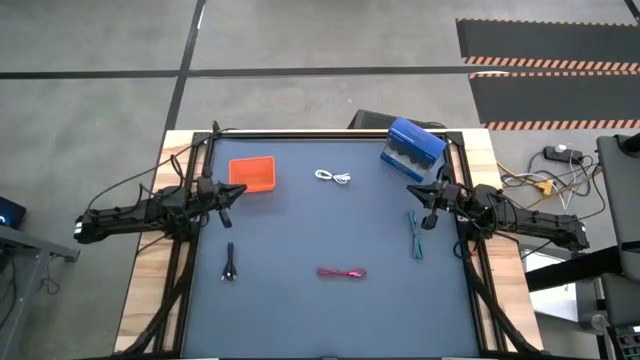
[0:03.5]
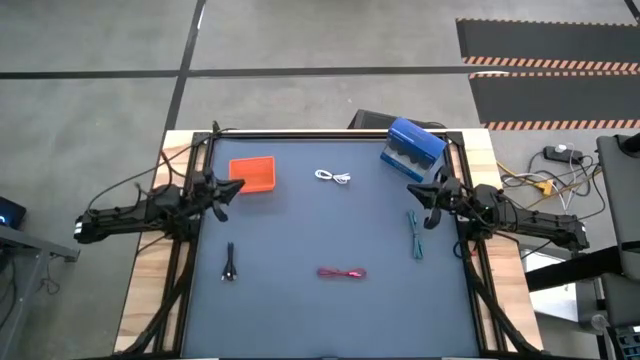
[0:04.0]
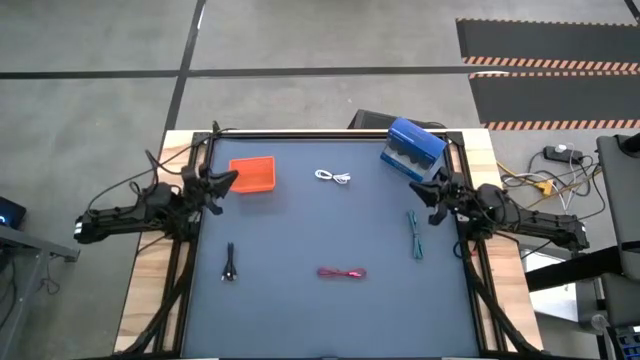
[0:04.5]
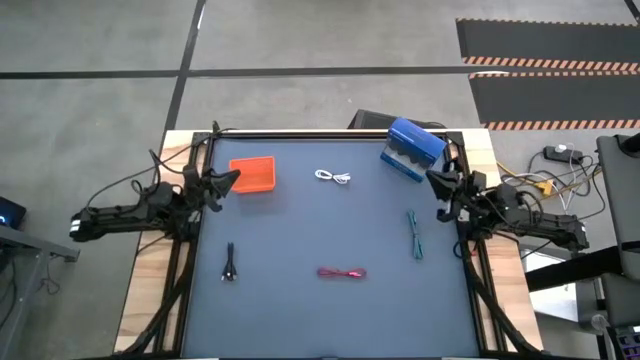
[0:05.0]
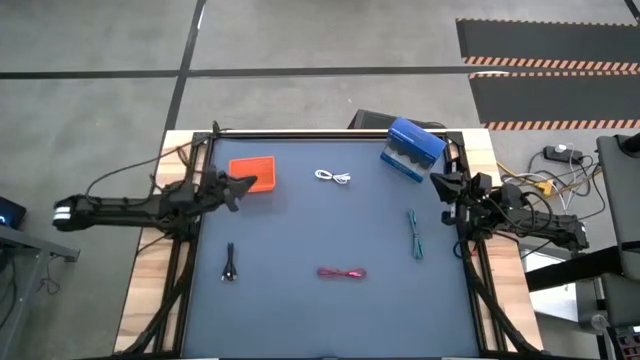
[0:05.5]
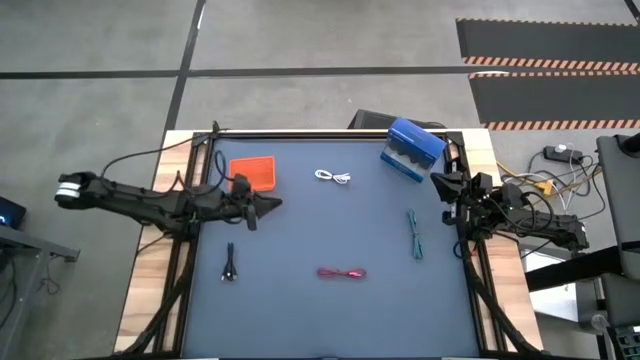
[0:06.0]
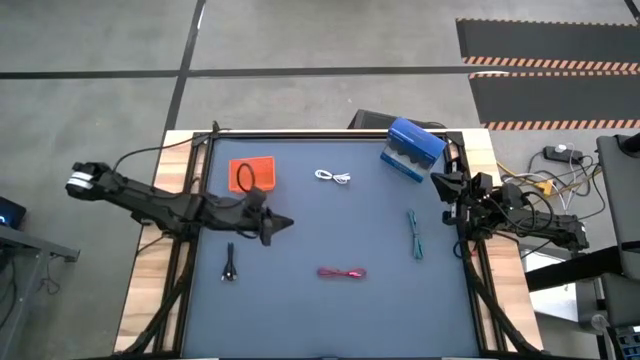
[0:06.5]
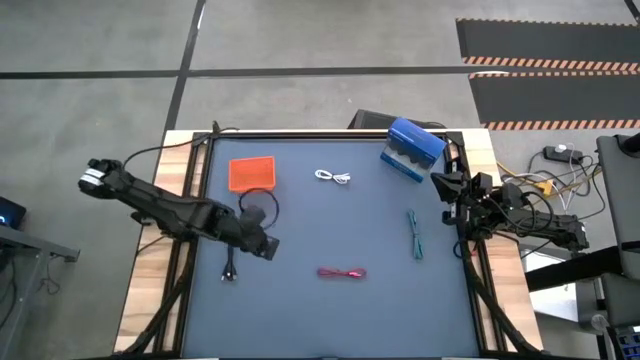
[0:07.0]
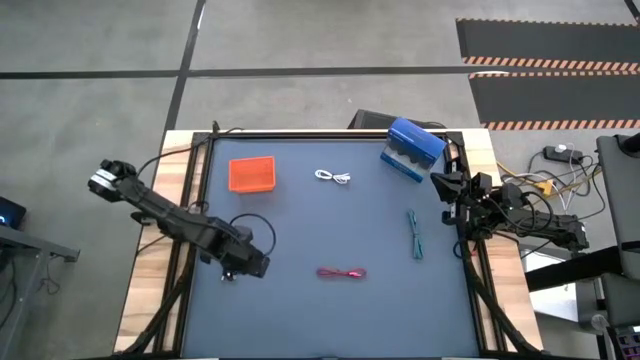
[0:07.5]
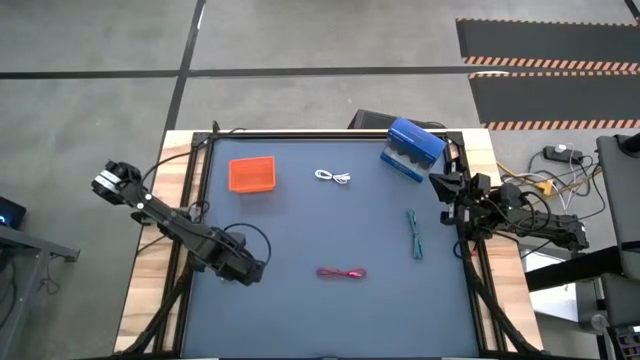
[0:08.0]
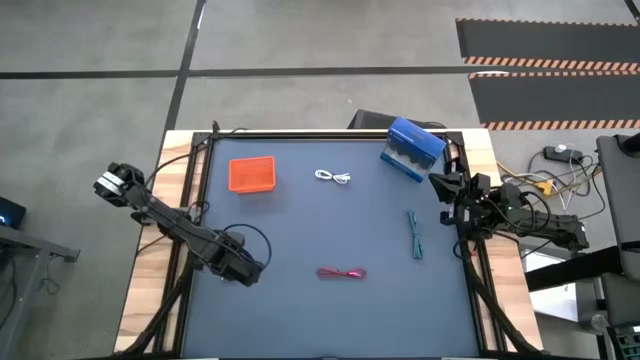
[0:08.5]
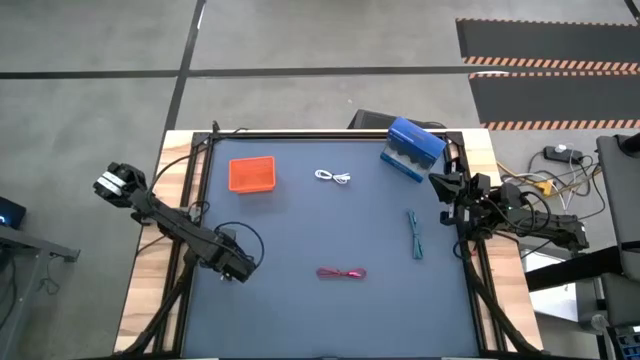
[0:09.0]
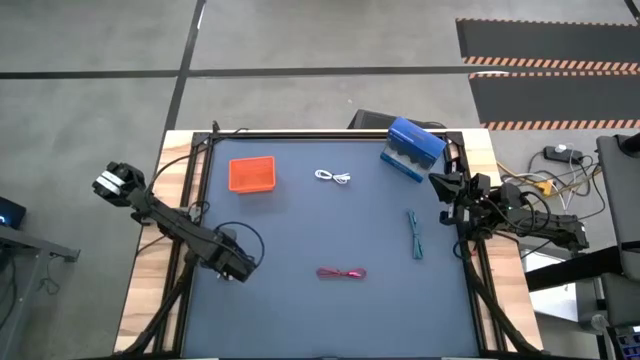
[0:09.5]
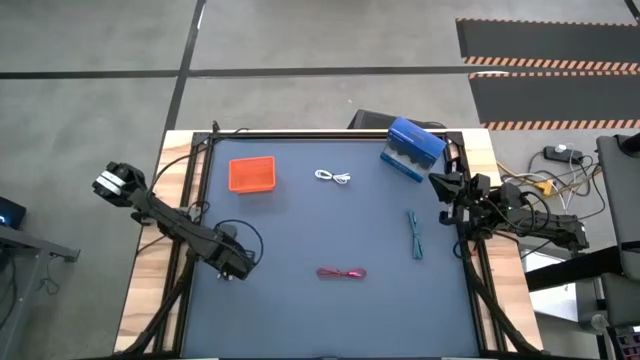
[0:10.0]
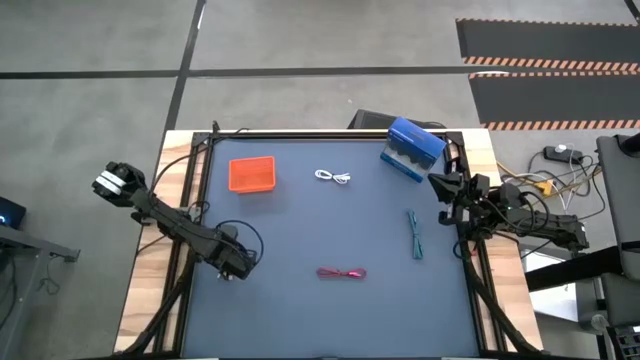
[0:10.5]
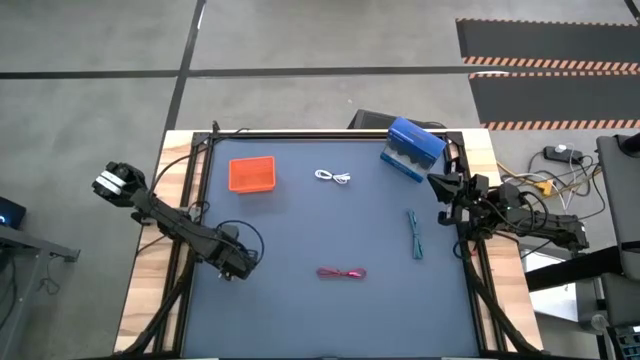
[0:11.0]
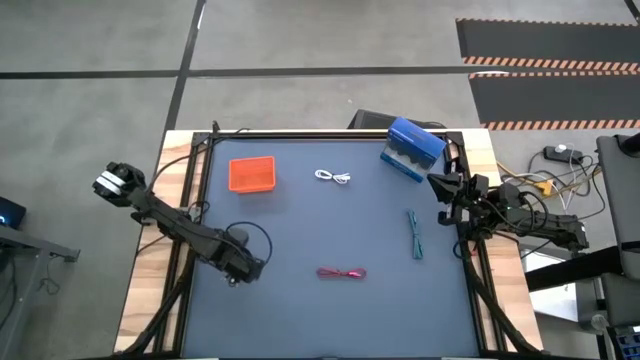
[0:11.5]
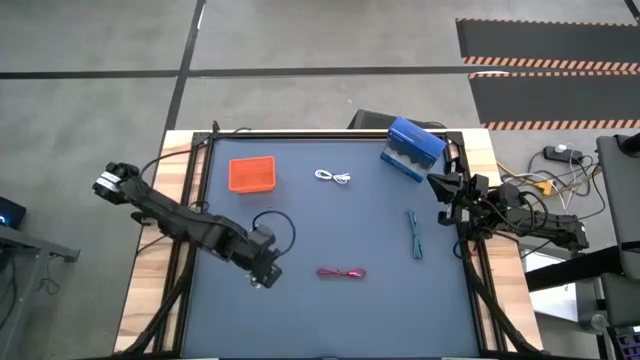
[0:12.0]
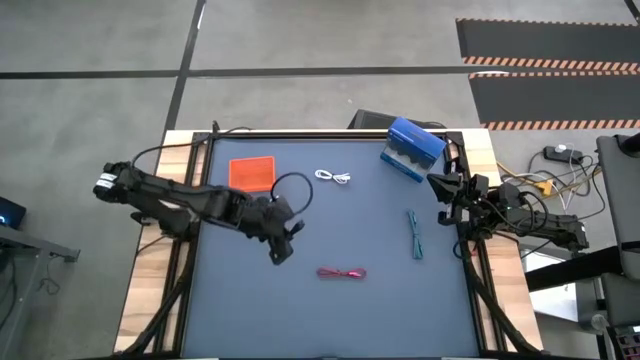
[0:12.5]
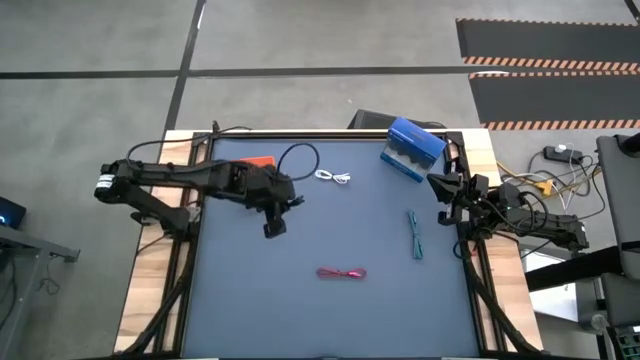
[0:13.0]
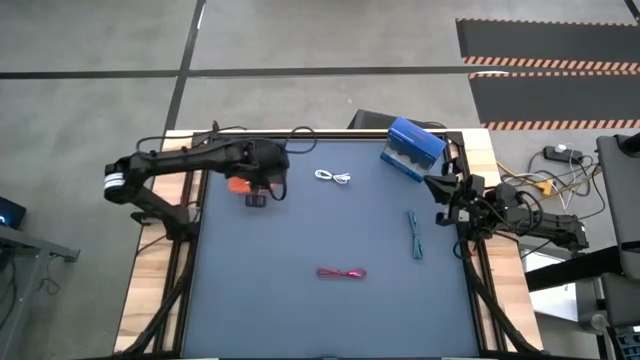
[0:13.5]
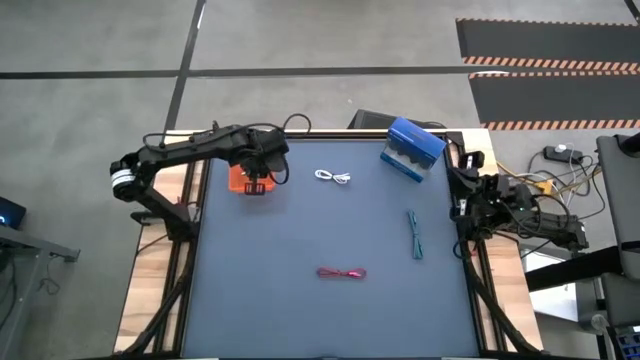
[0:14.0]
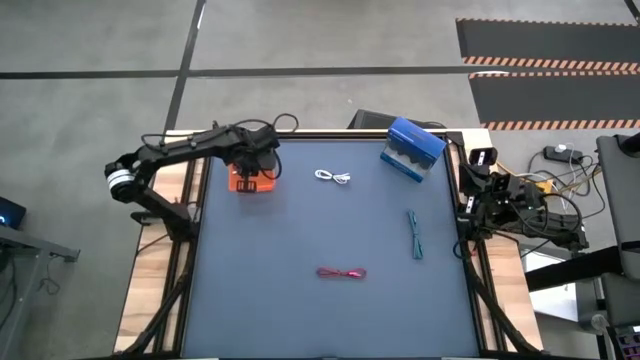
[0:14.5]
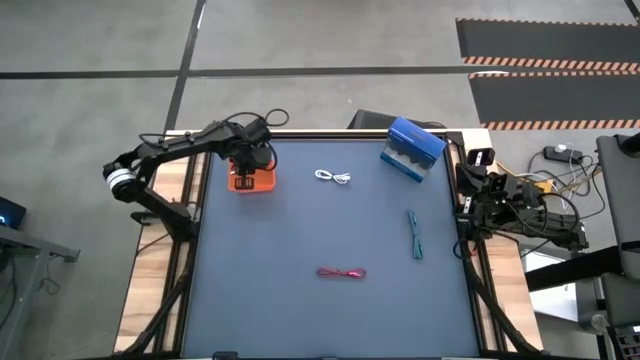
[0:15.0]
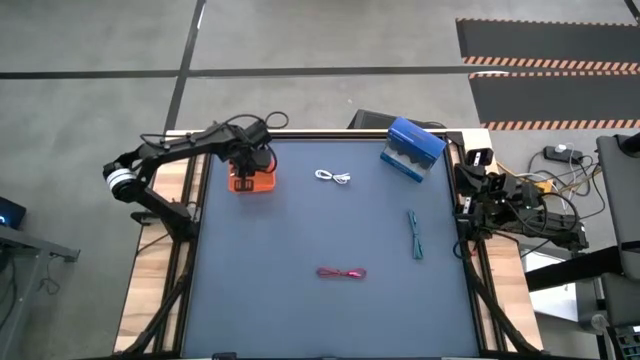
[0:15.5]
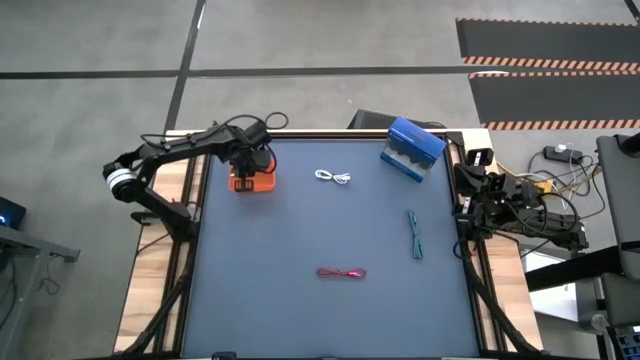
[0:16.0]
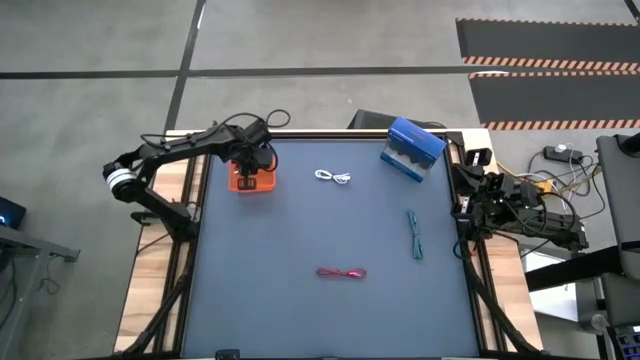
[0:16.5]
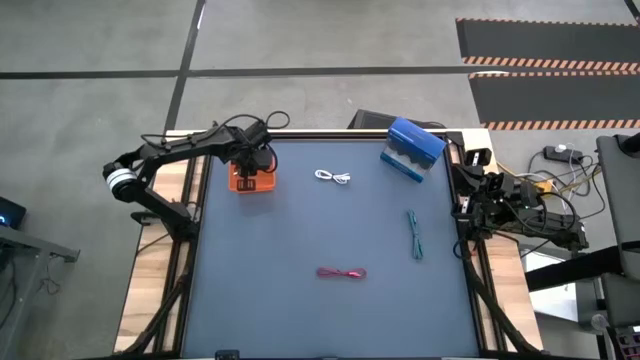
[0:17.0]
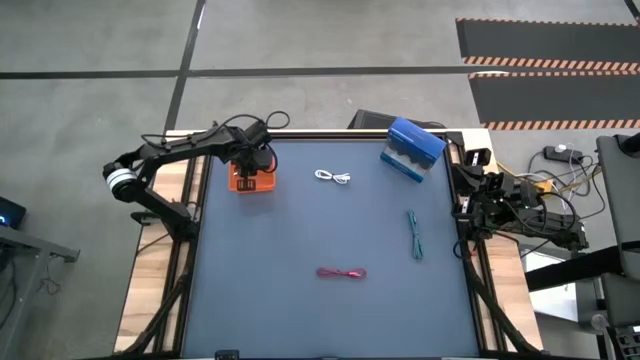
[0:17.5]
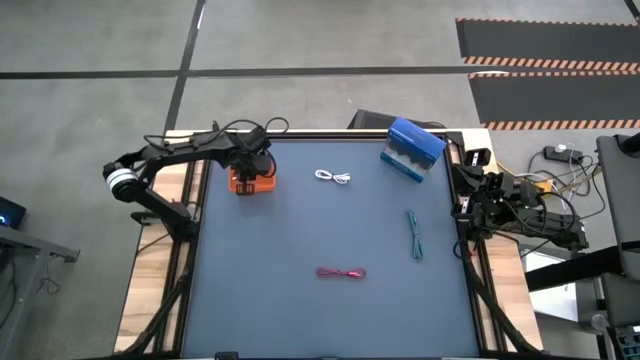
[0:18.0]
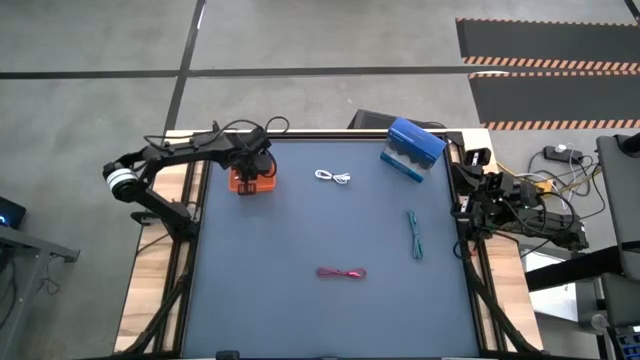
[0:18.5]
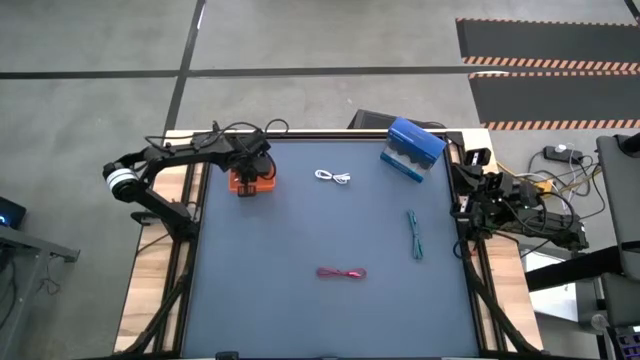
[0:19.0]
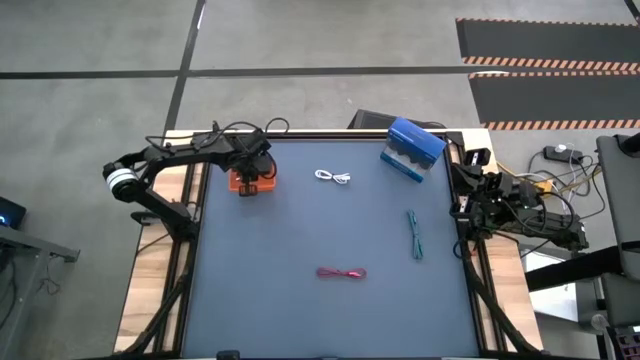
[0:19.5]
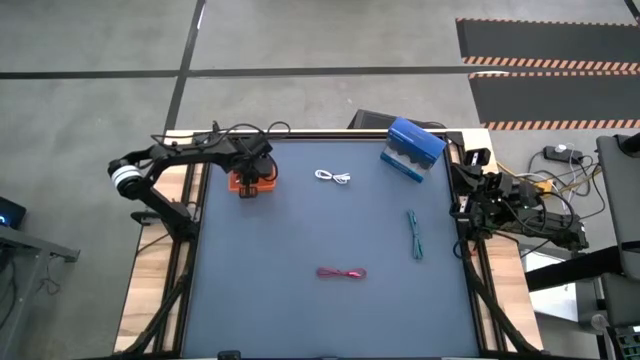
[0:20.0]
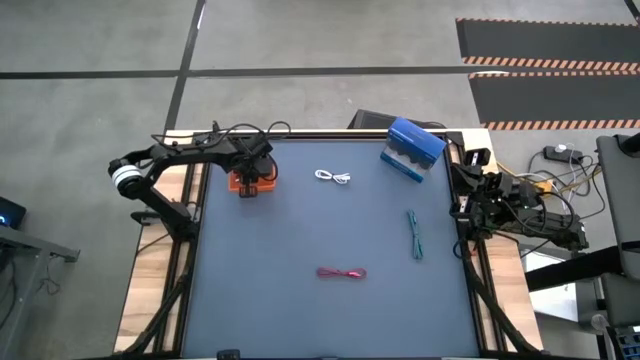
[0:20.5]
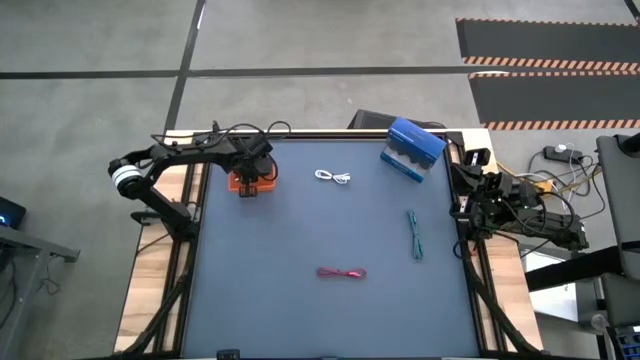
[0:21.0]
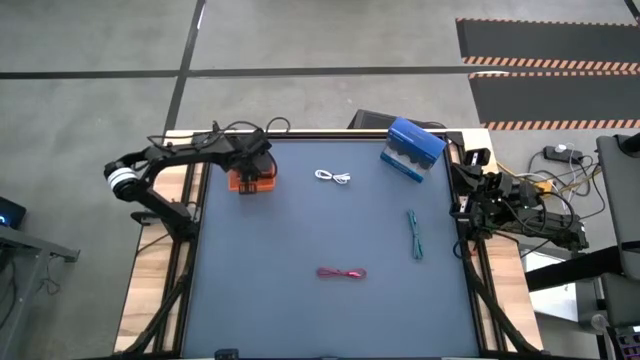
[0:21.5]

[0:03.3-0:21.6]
Task: Pick and place USB-C Cables
Put the black charger cable into the orange basket
